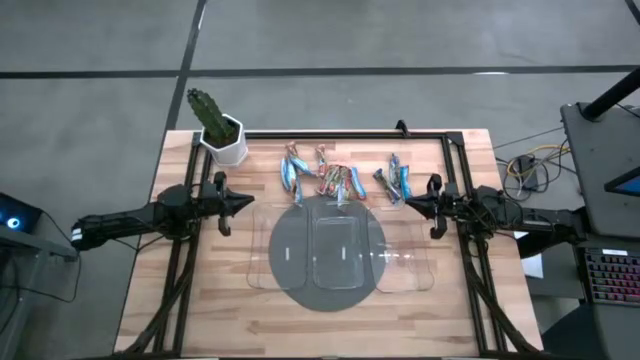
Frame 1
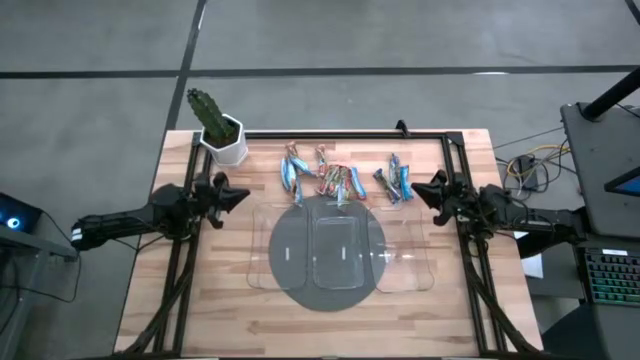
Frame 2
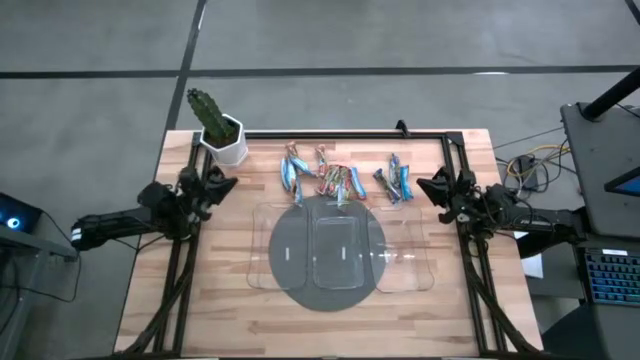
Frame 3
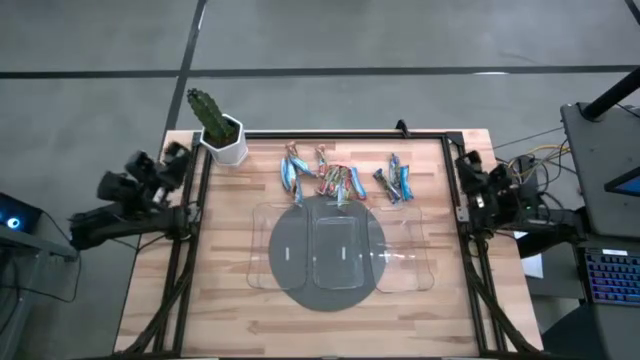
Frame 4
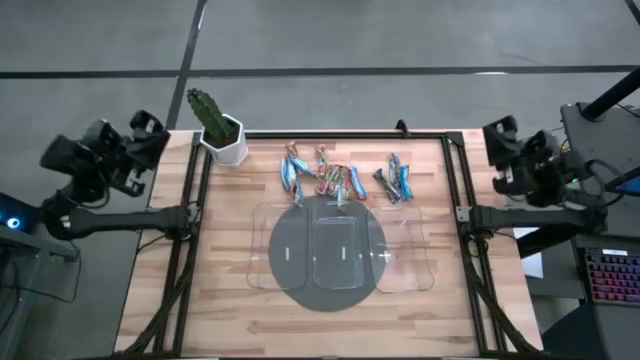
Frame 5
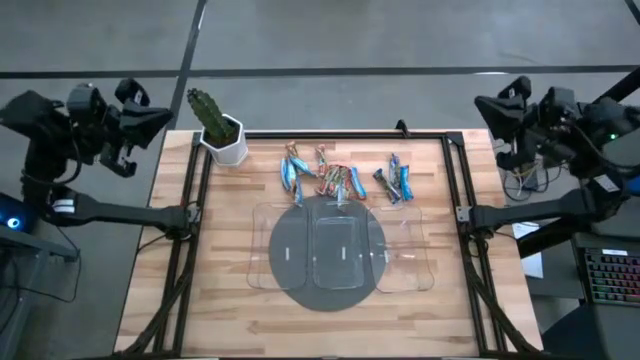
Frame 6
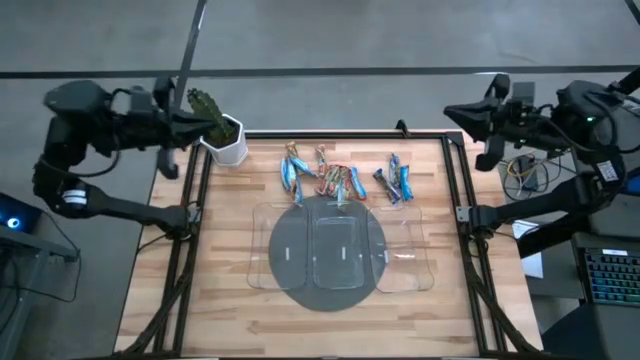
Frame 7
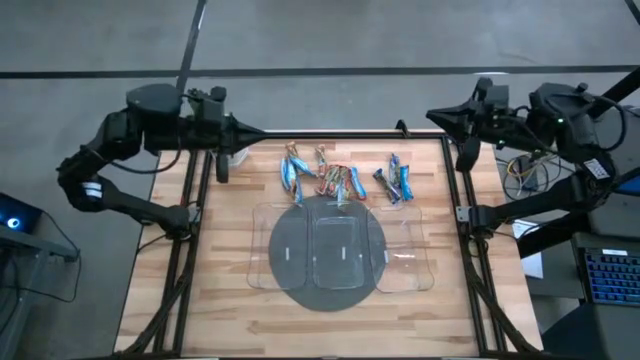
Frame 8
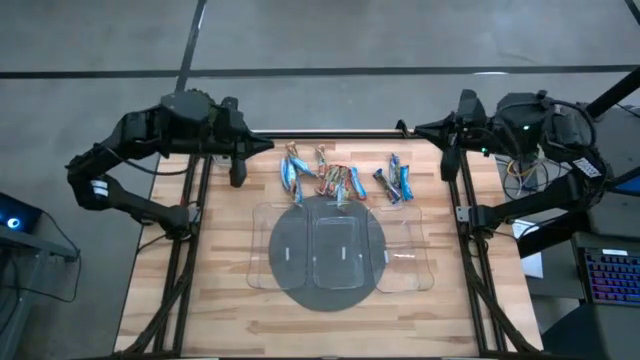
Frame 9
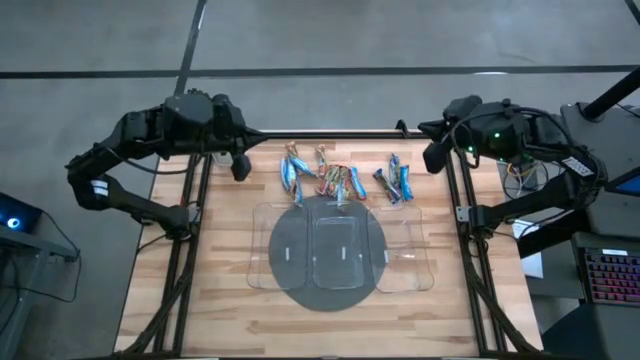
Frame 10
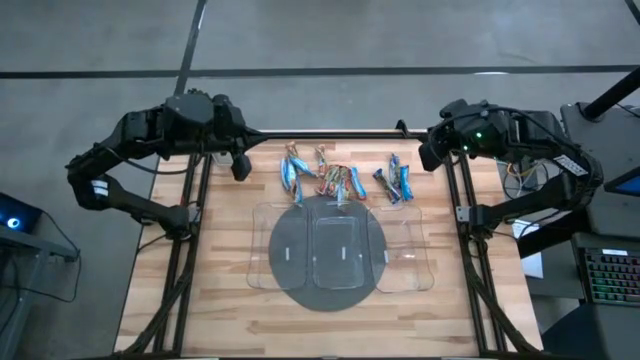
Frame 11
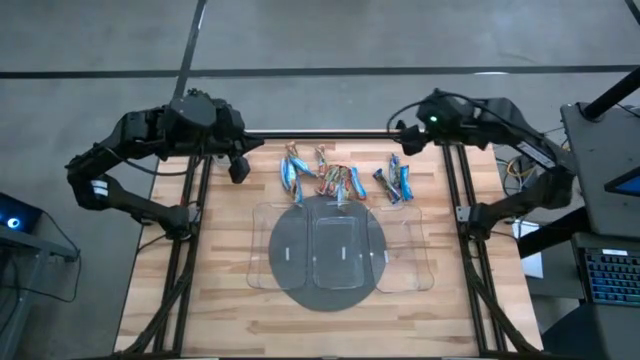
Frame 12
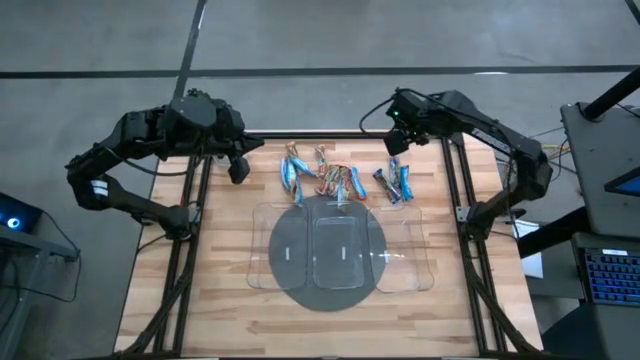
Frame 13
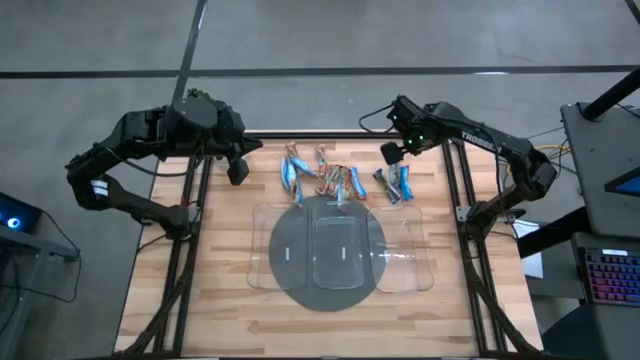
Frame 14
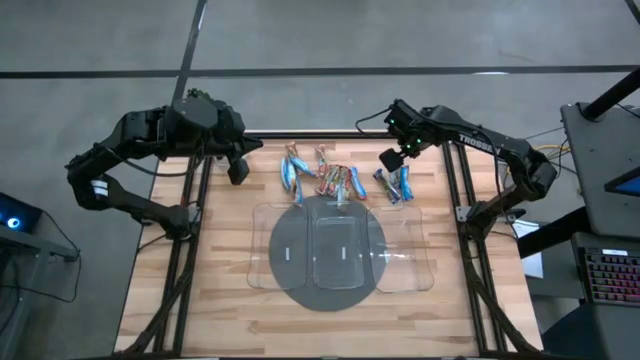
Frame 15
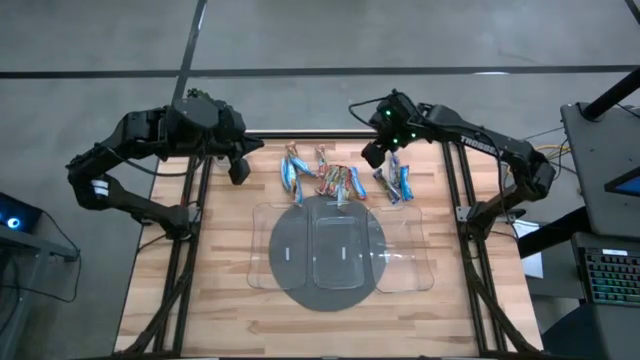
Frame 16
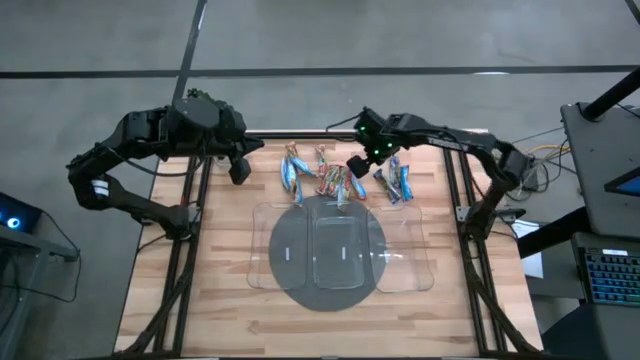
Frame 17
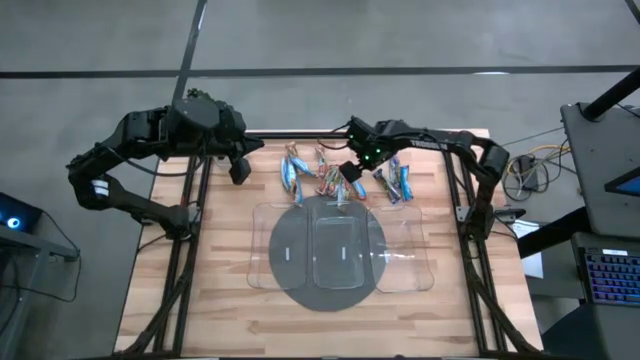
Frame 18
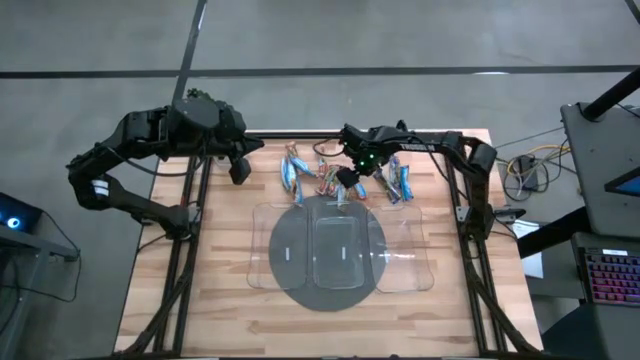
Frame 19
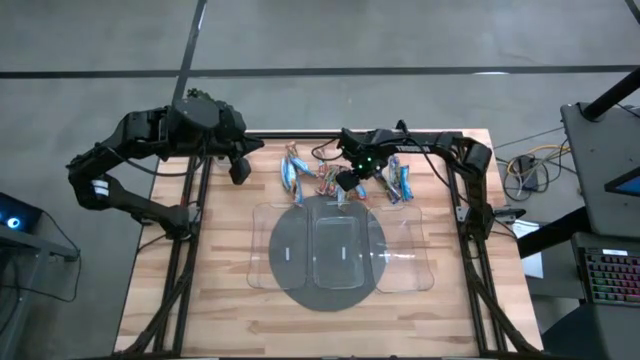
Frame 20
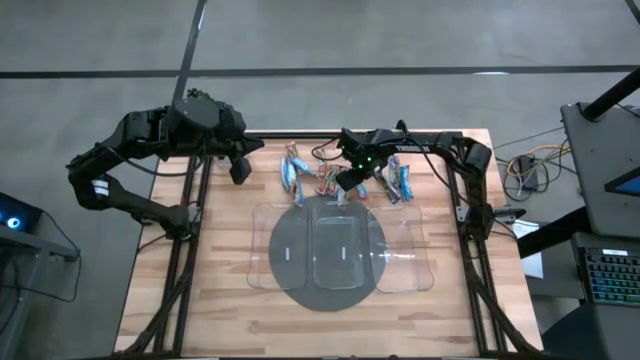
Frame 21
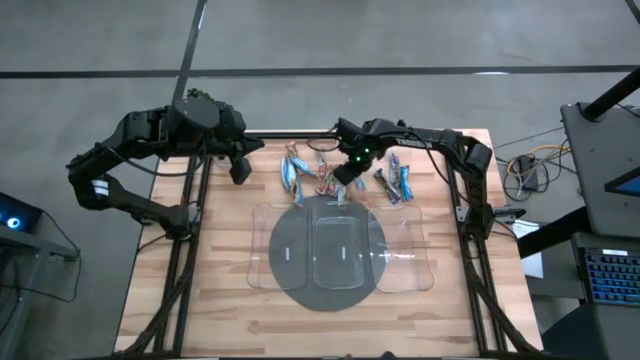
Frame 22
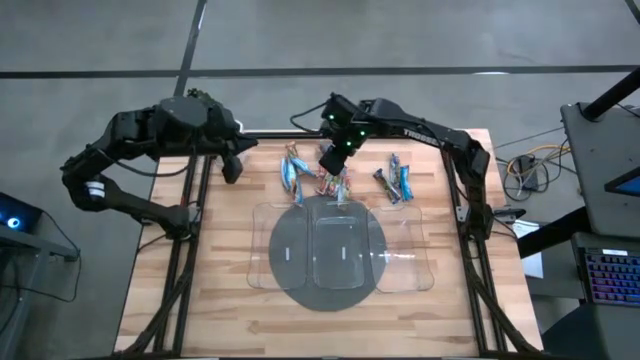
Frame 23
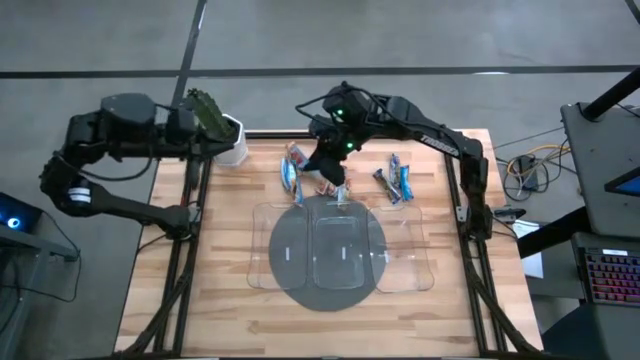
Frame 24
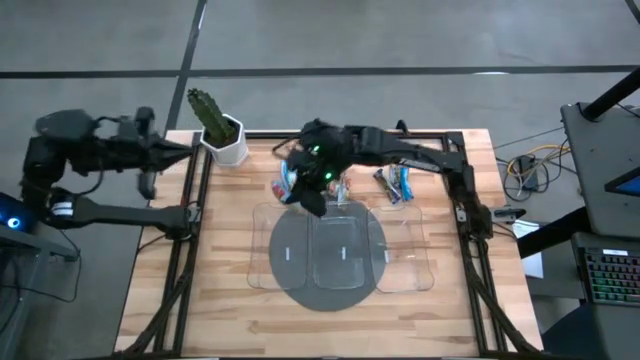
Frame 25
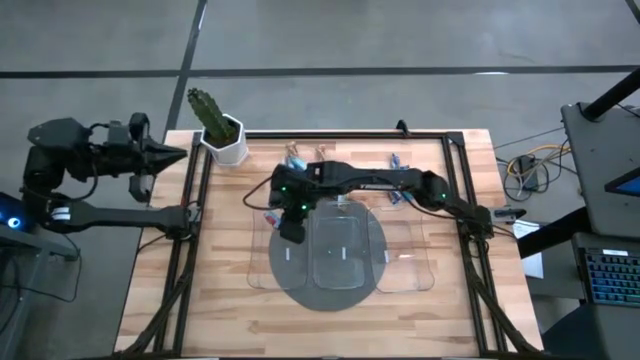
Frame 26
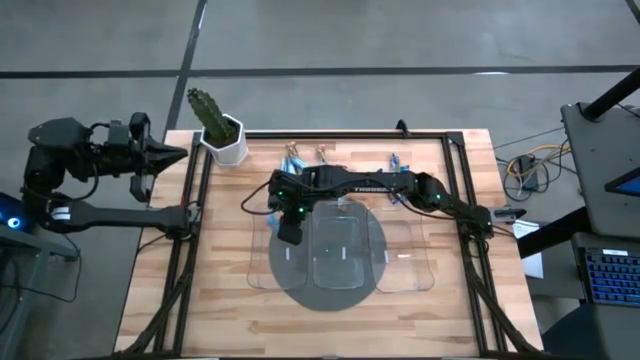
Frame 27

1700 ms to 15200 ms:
Task: Pick and place Granola Bars by type
Put the red granola bar into the left transparent bin

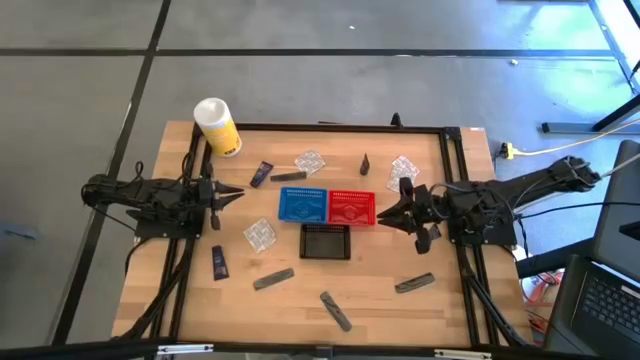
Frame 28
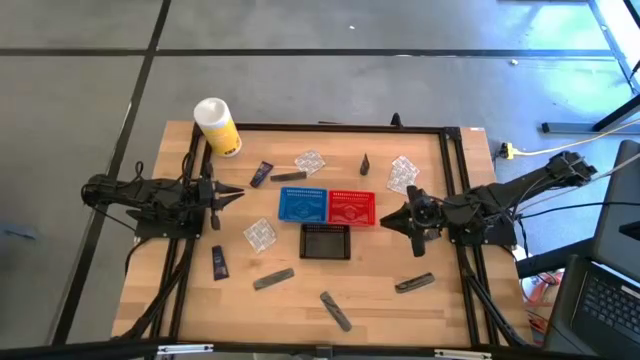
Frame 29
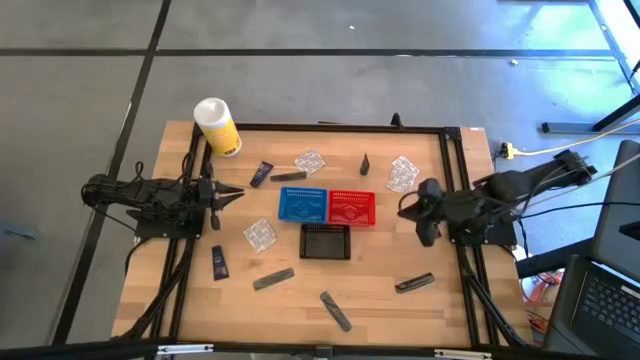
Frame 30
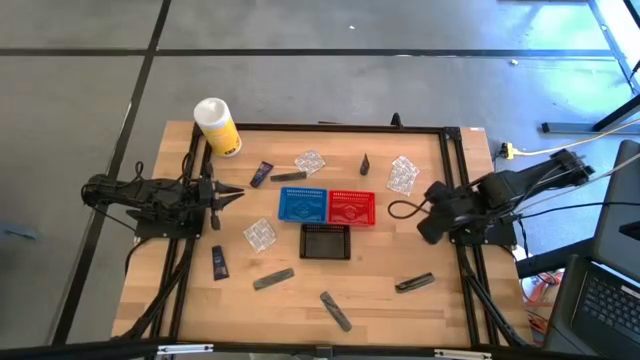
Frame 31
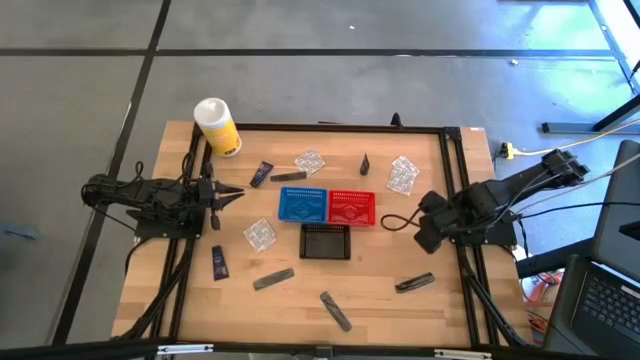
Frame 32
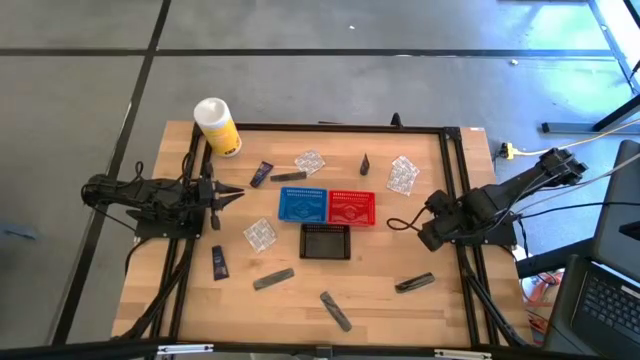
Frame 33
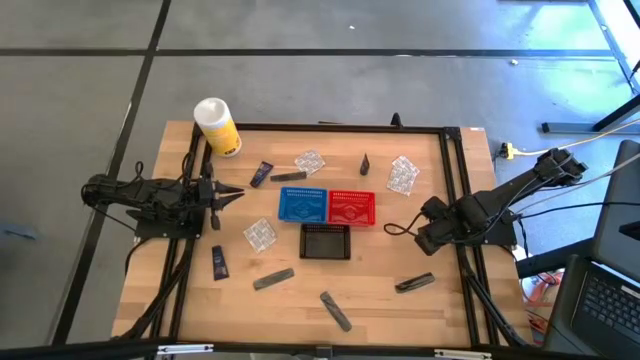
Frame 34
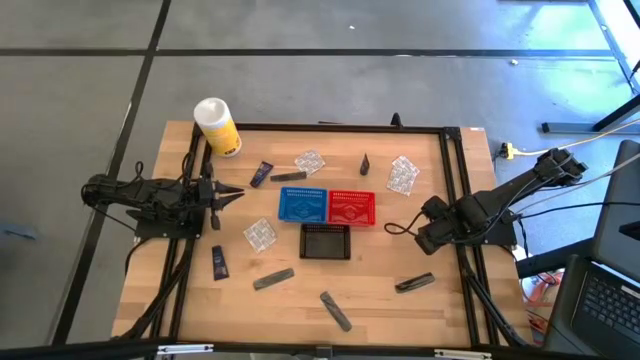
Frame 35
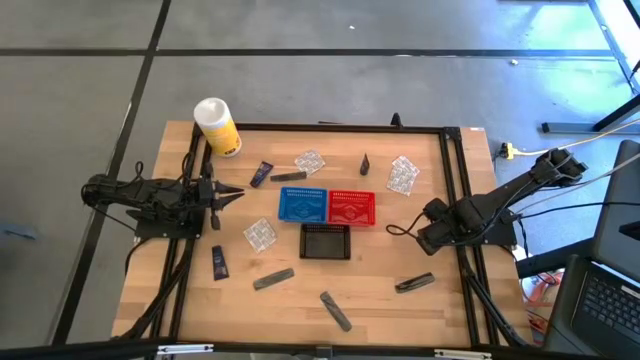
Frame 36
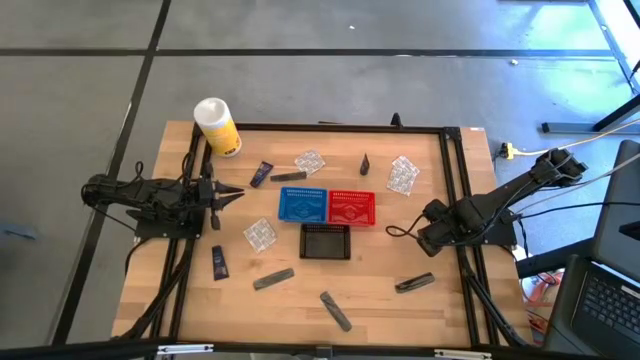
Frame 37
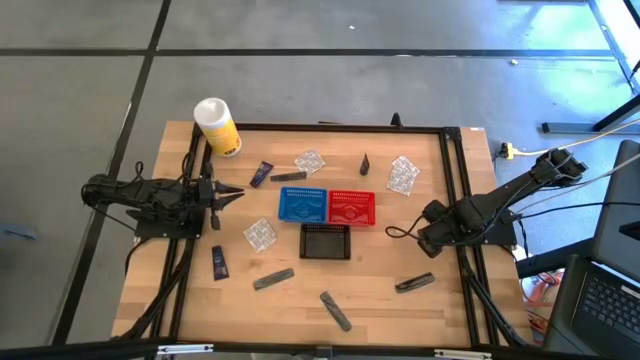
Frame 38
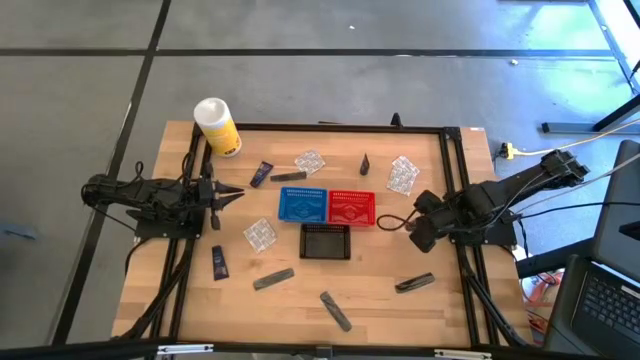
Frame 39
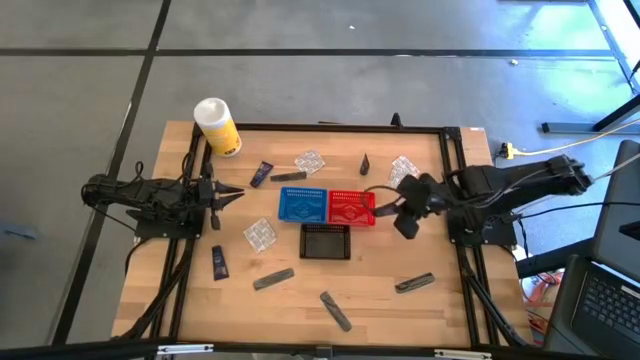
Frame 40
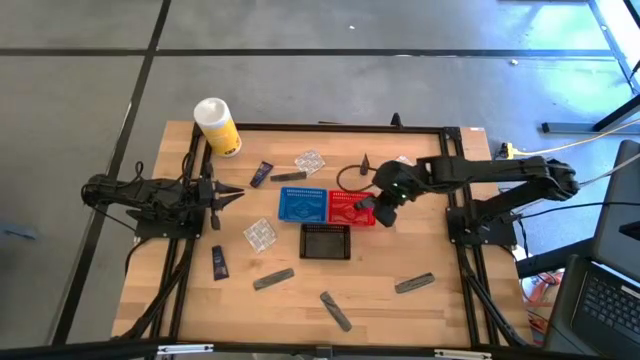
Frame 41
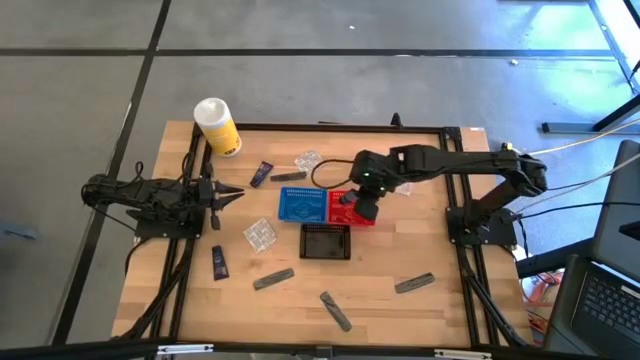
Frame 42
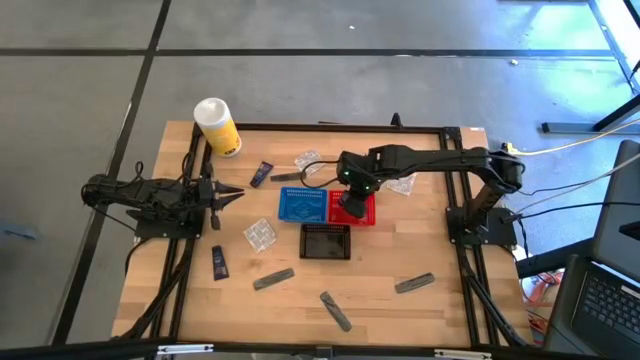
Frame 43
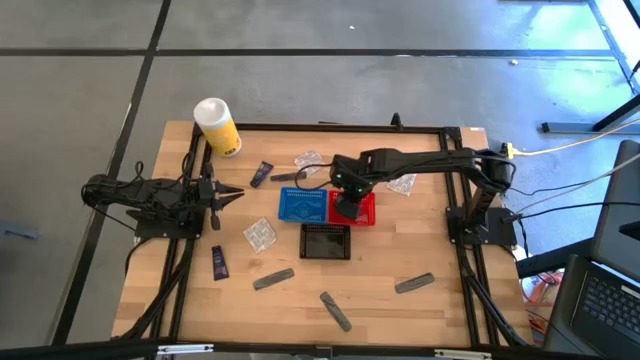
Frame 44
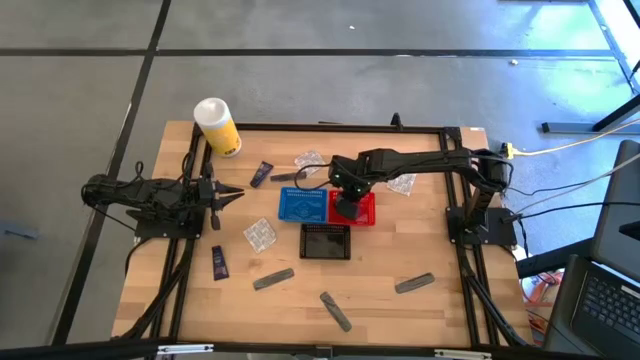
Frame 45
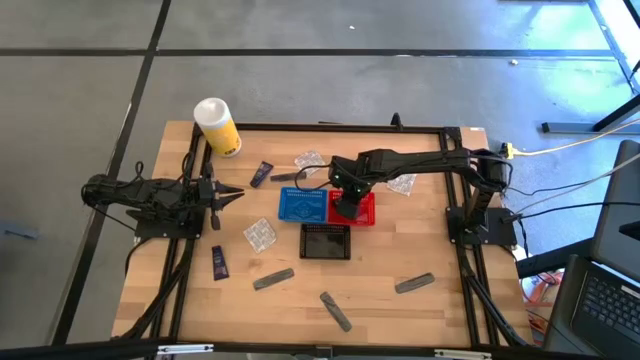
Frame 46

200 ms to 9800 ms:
Task: Pick & Place Travel size toiletries
Put the blue shaver cream into the red bin
